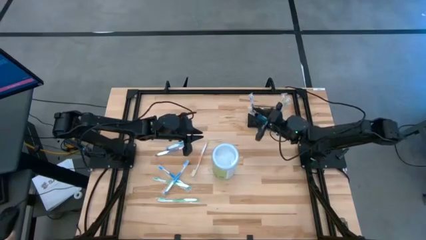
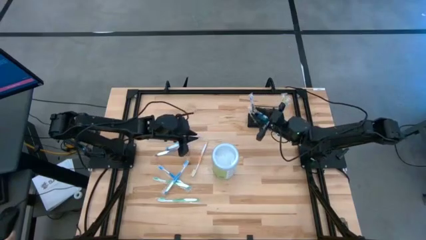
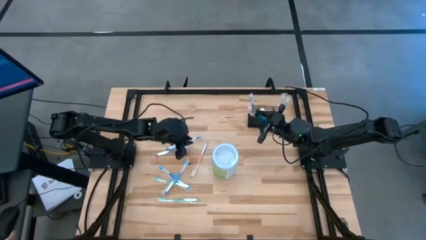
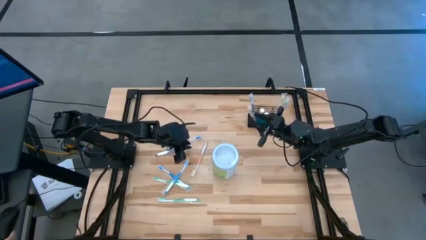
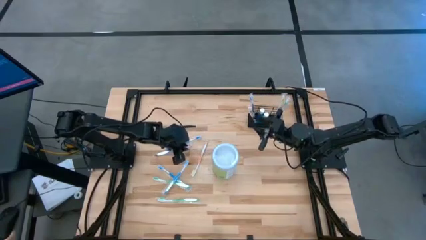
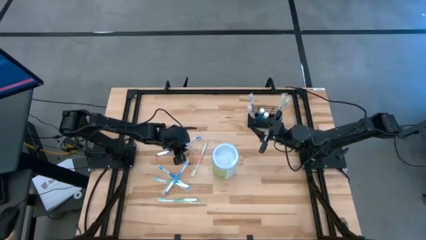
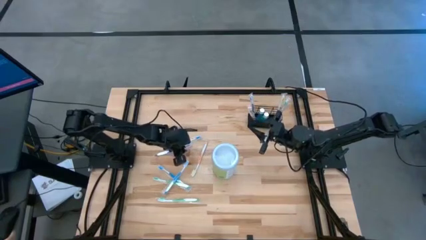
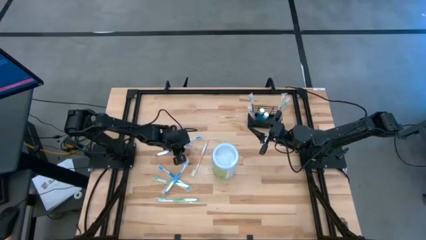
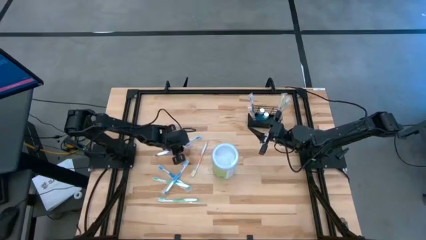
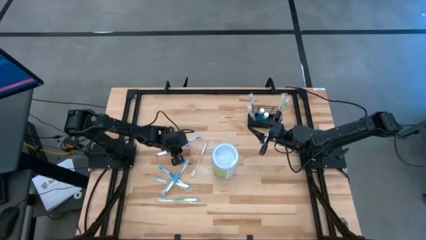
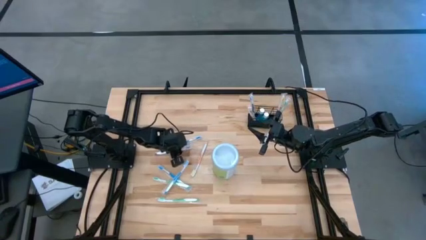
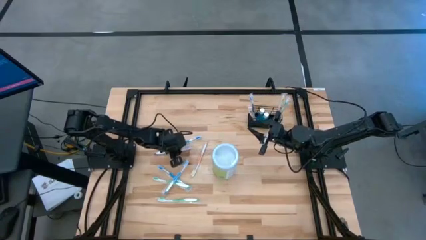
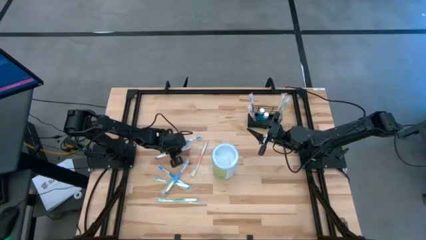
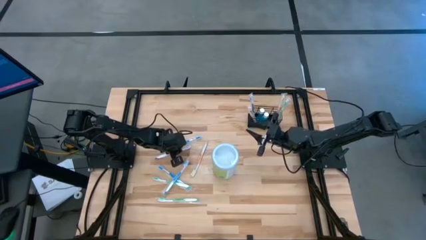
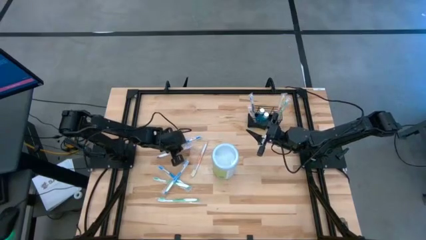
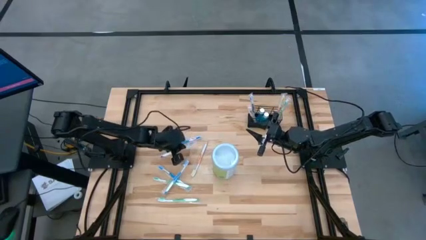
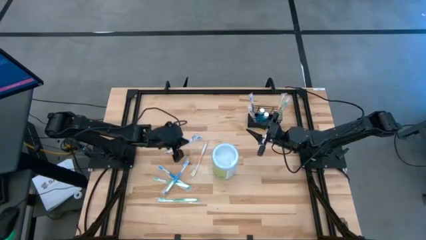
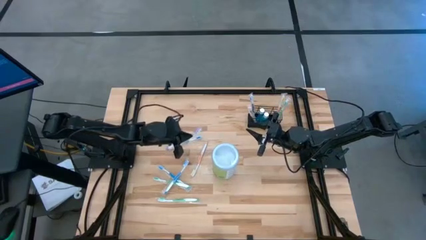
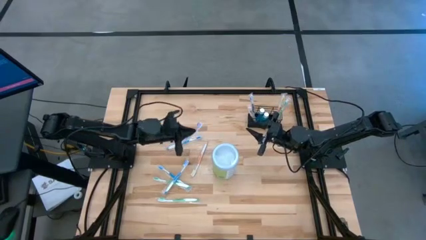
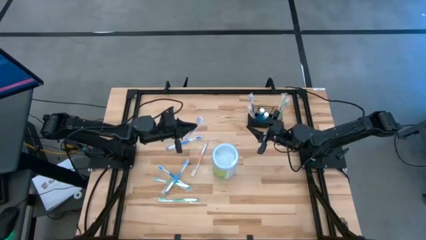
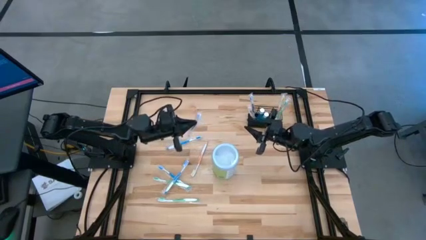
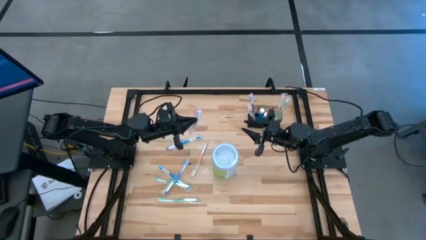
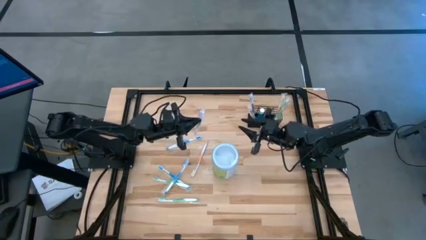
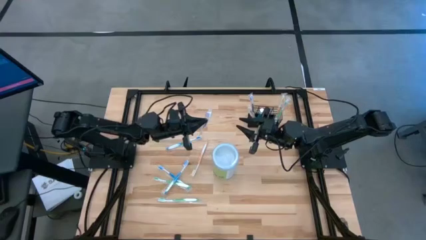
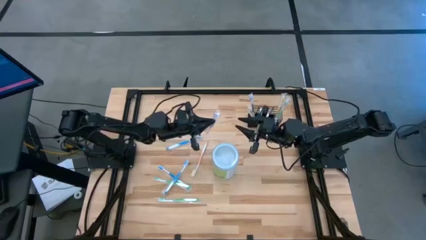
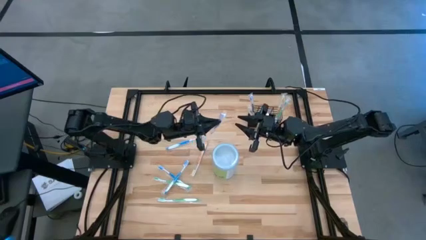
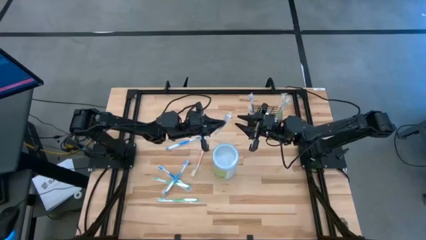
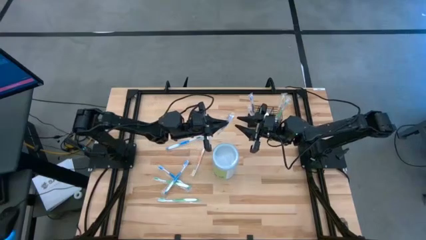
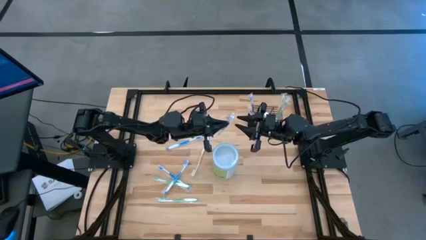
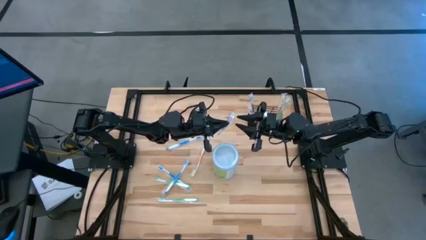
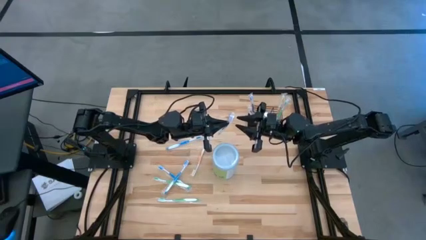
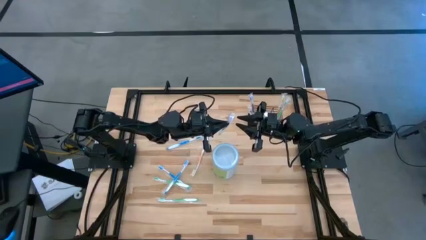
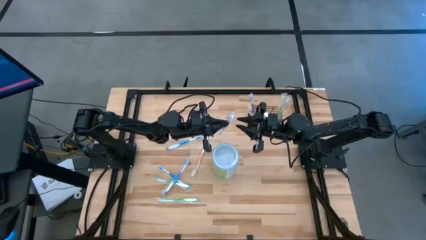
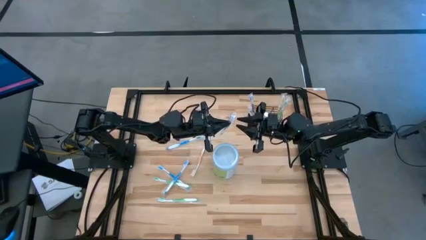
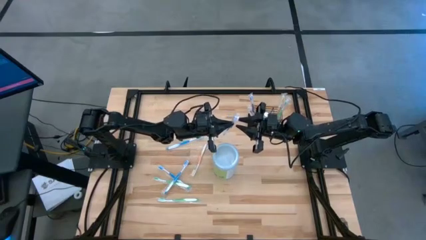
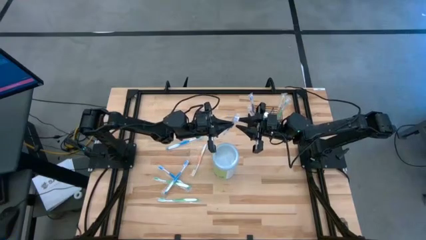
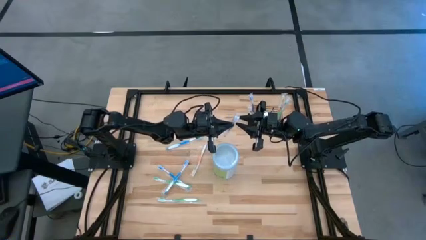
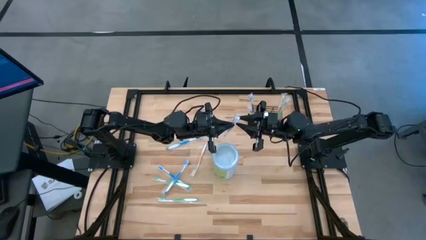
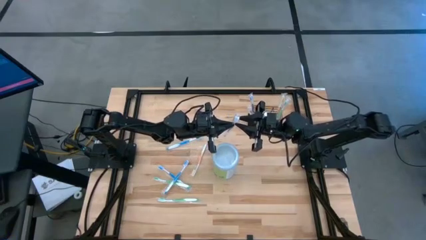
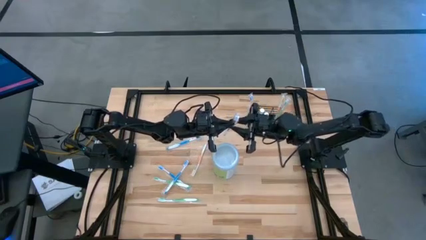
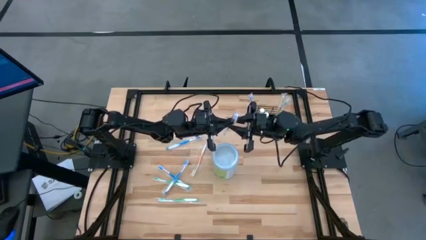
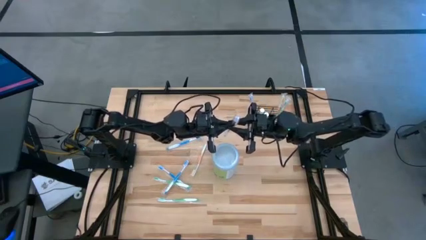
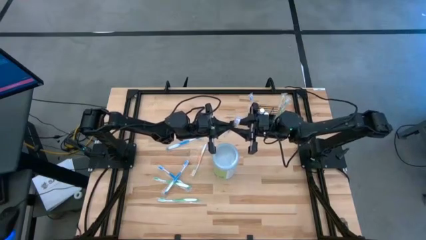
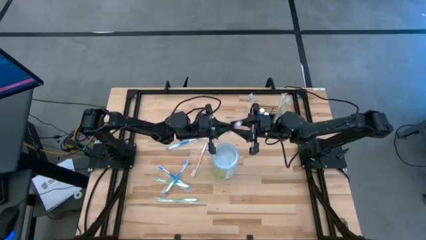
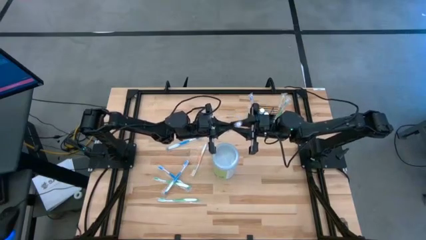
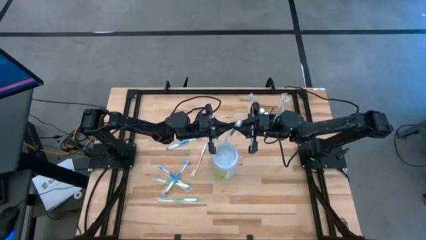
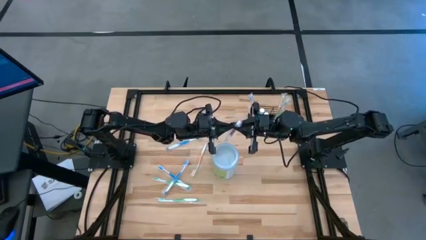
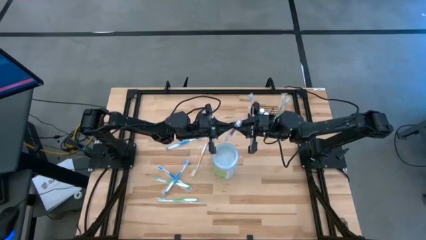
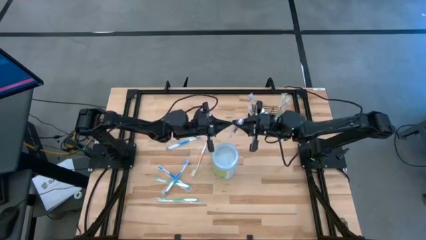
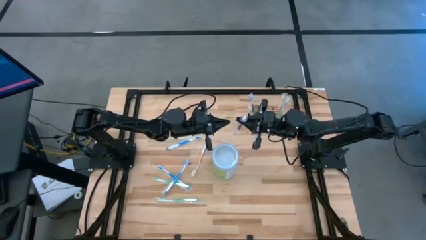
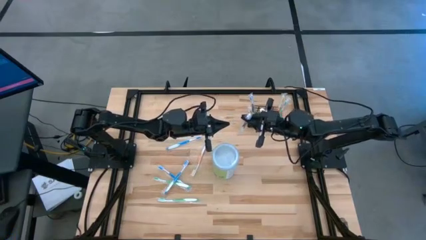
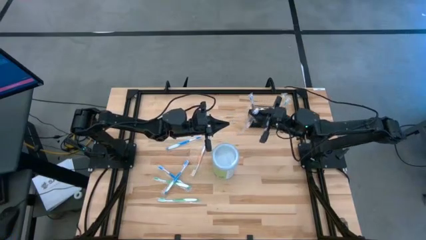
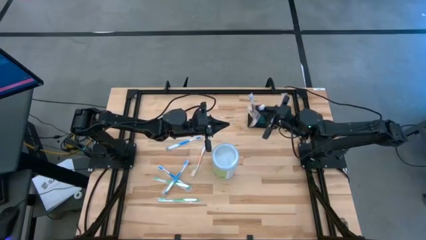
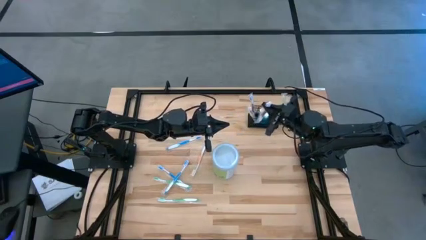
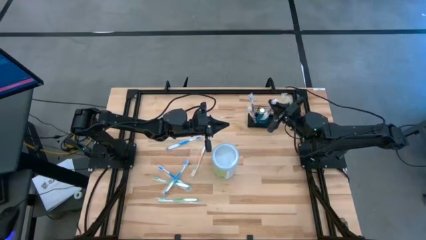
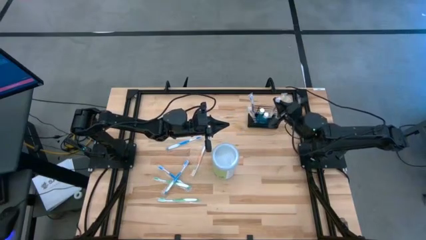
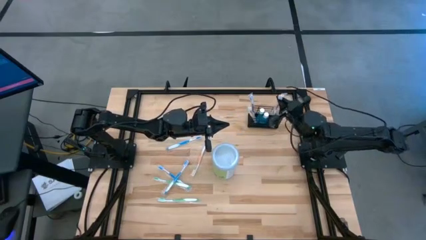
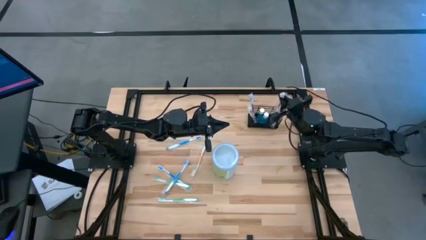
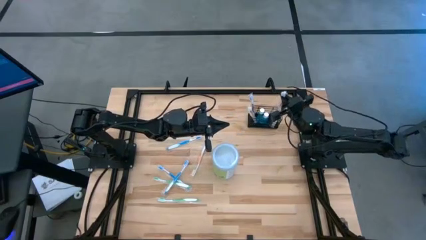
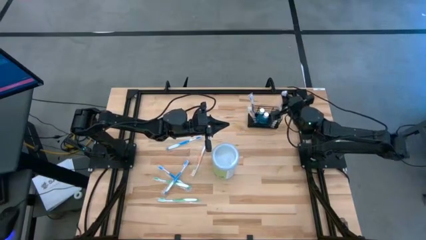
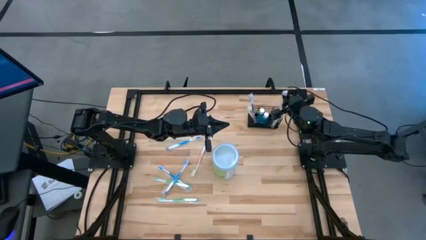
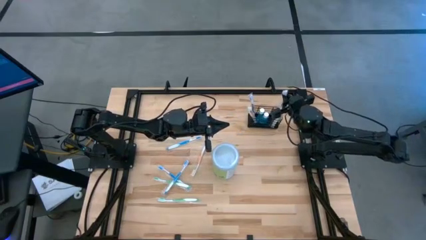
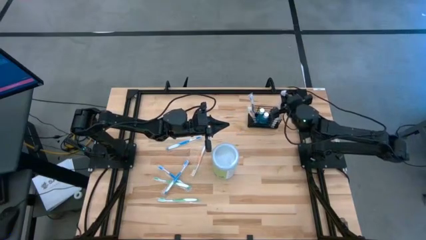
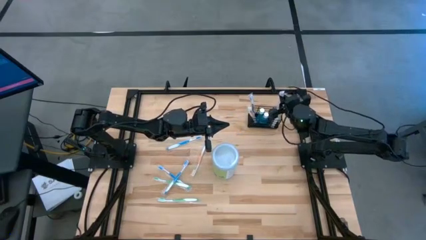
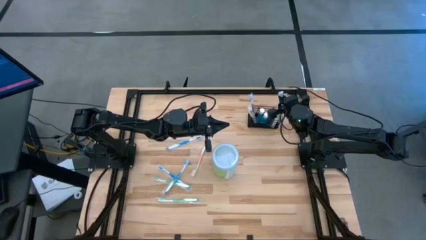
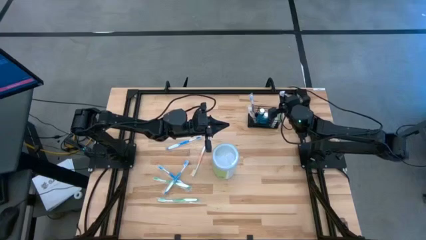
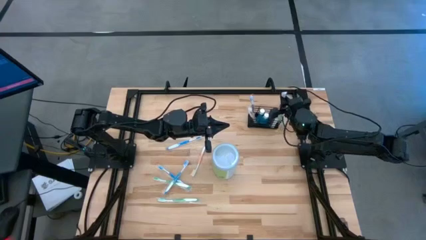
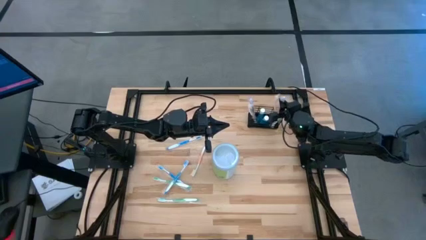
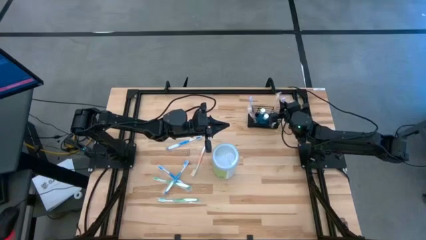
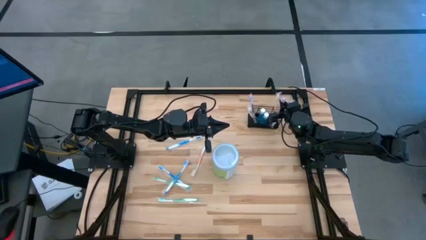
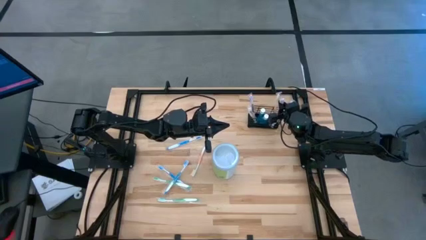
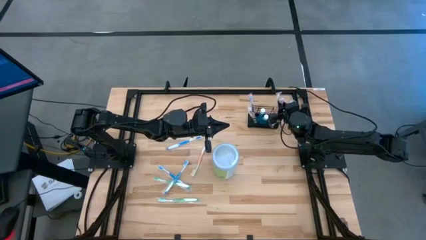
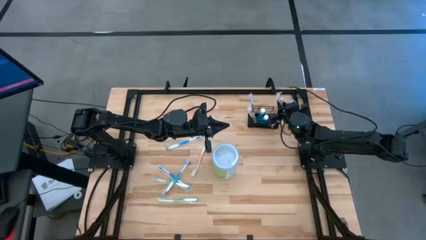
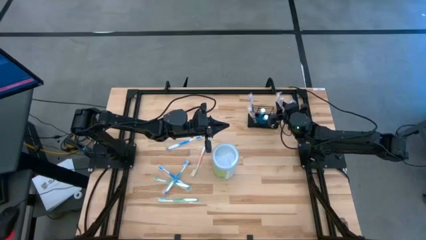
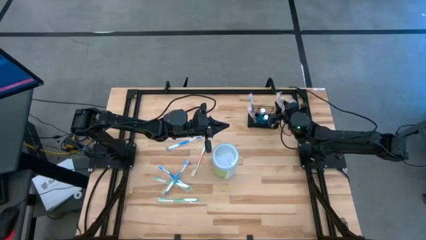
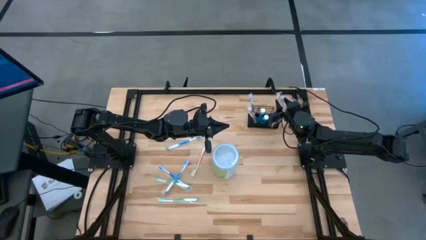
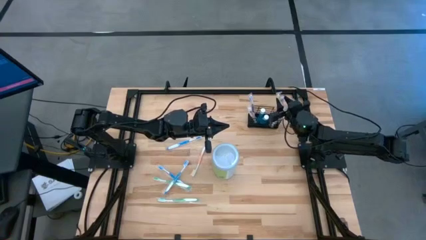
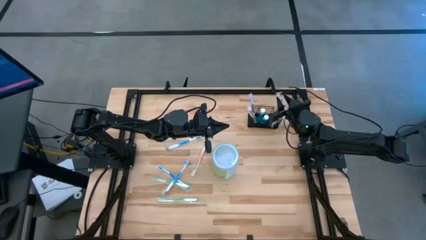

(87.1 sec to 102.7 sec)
Task: Pick & Place toothbrushing station
Put the purple toothbrush into the wire organizer
